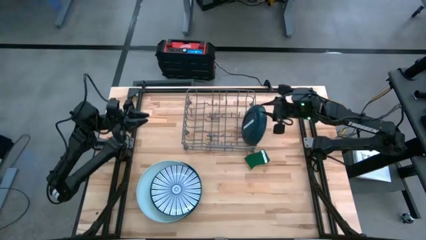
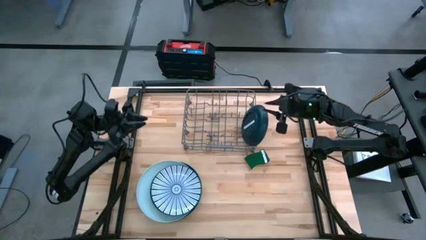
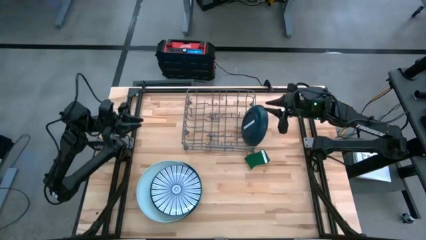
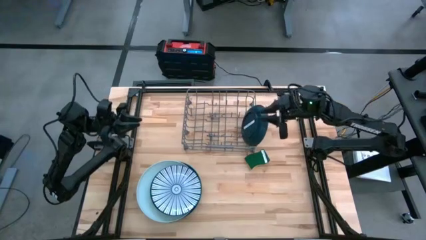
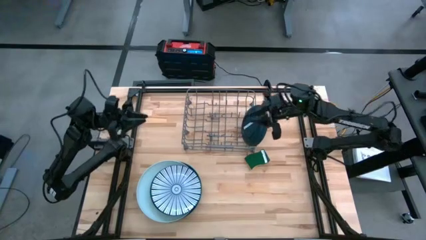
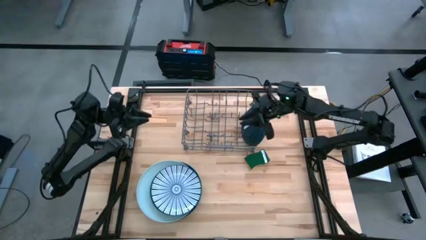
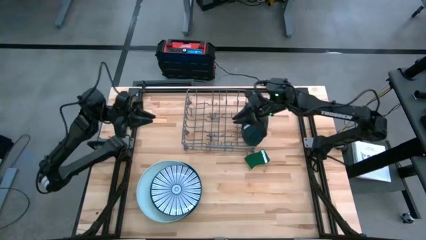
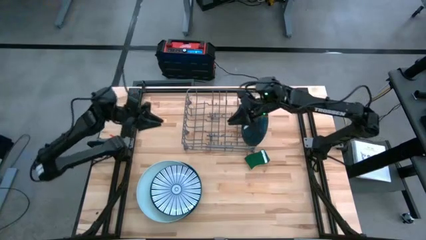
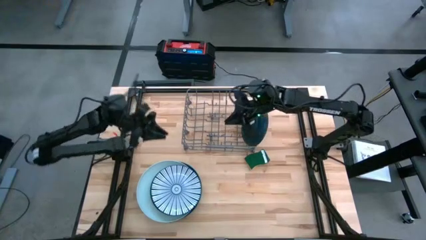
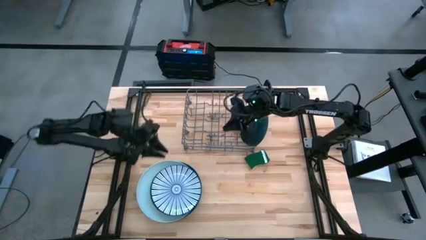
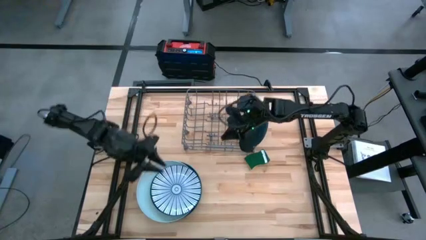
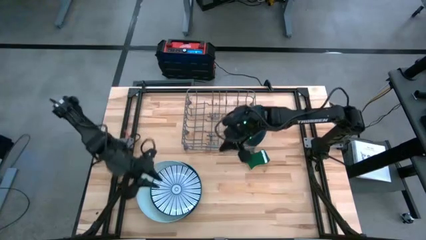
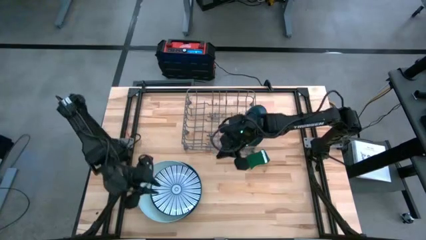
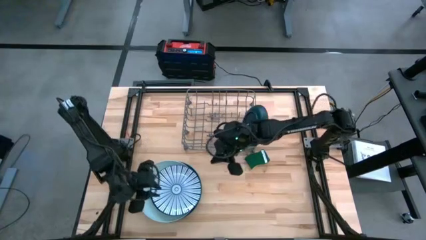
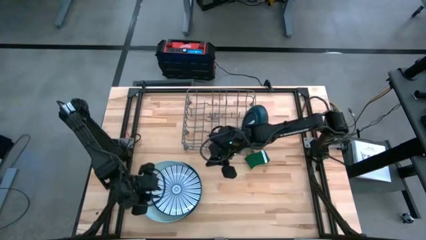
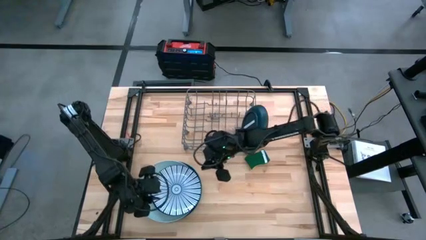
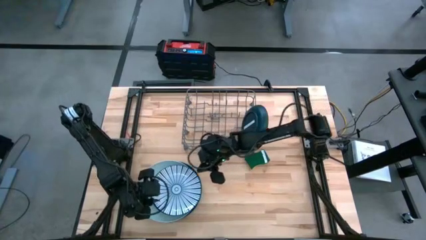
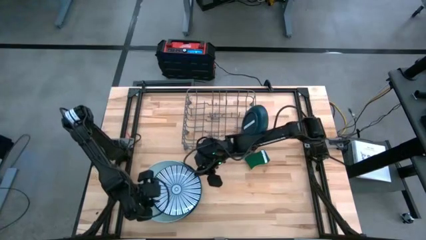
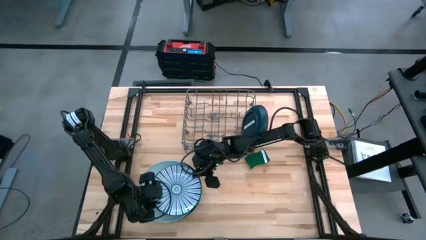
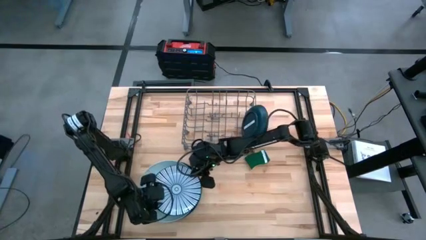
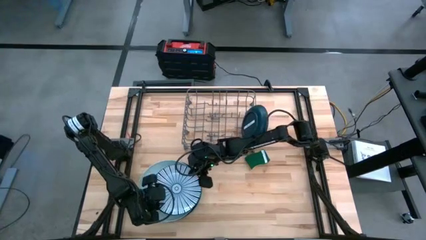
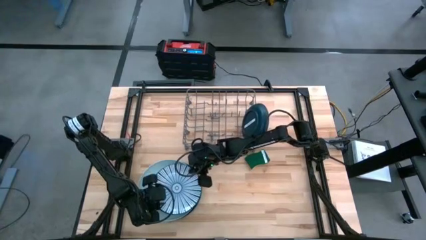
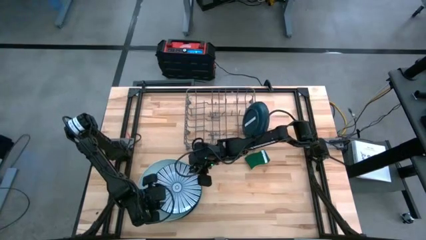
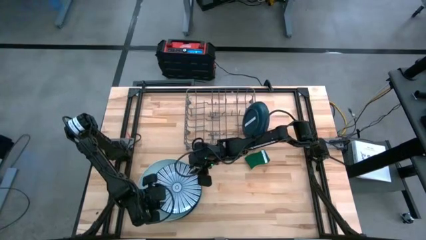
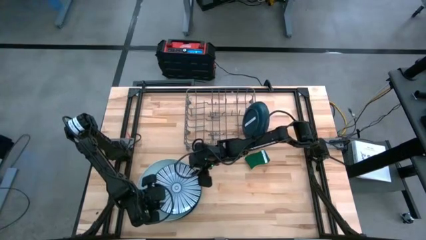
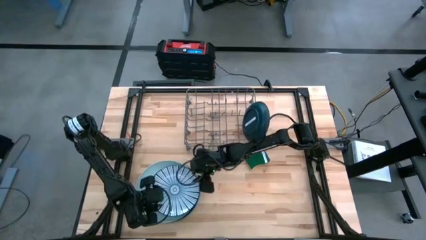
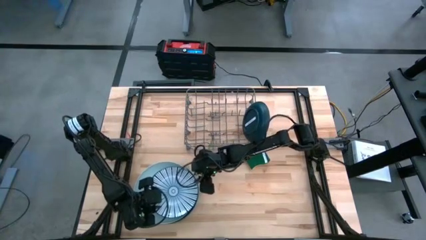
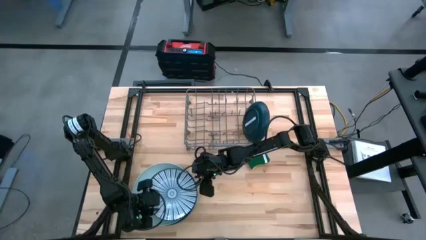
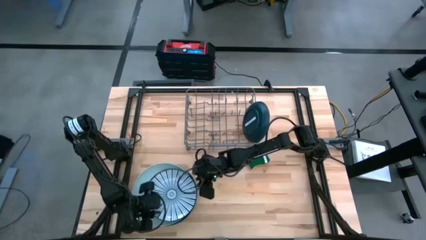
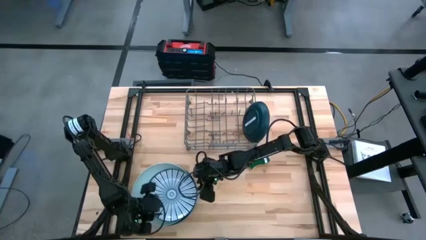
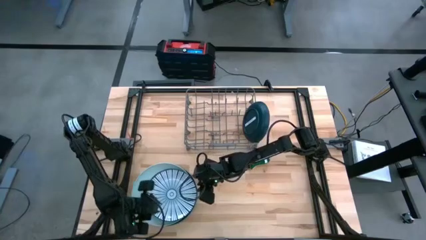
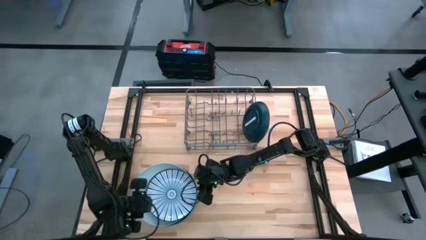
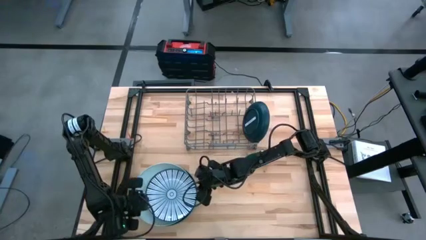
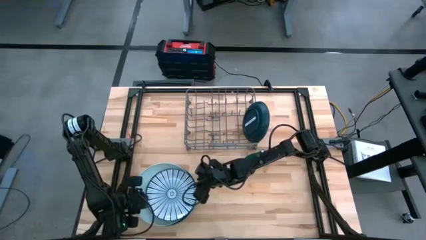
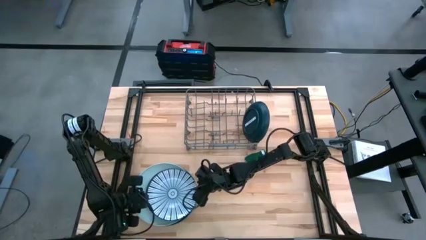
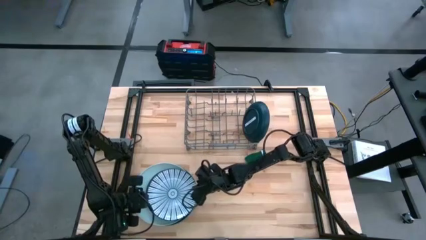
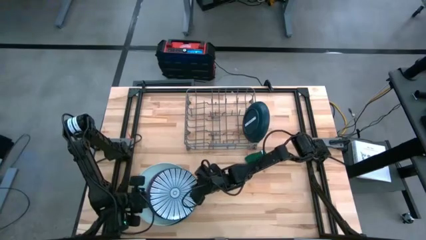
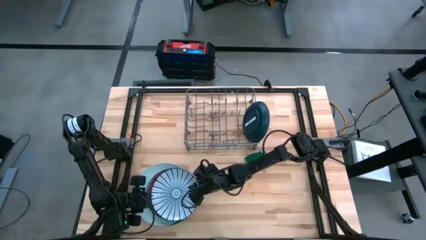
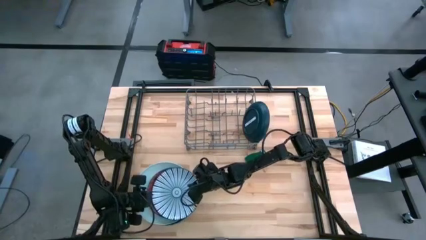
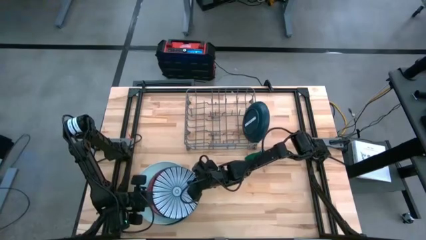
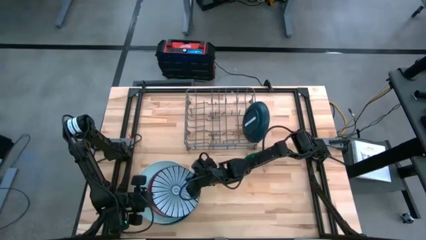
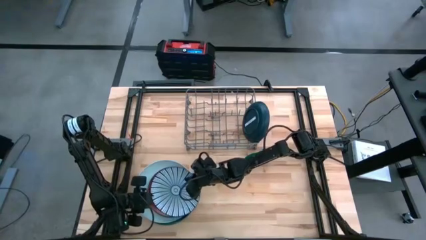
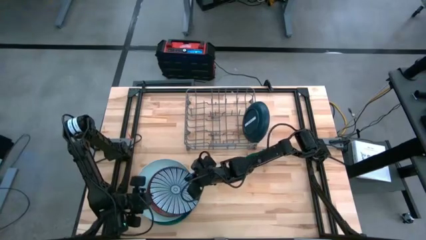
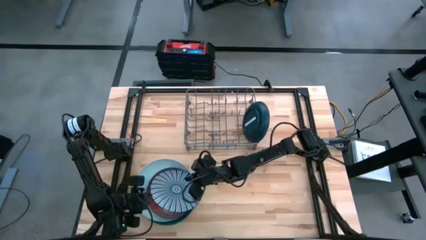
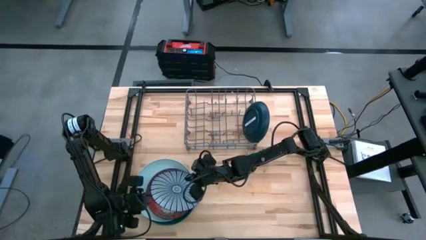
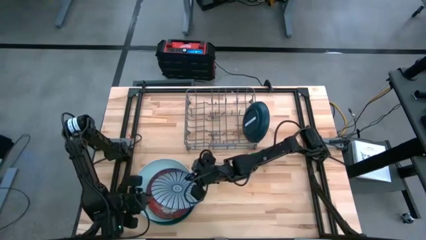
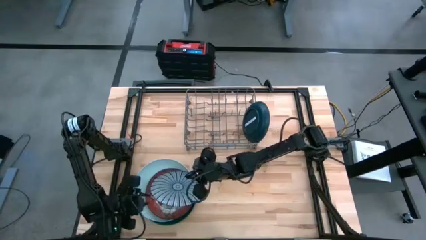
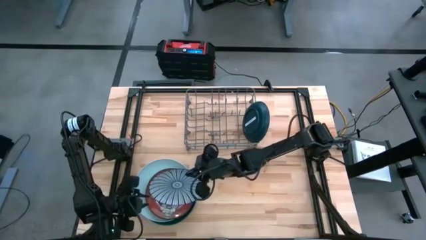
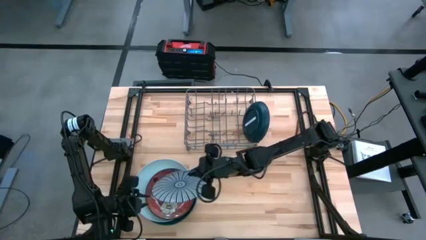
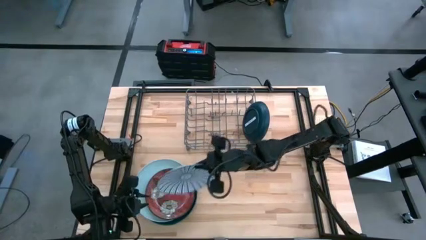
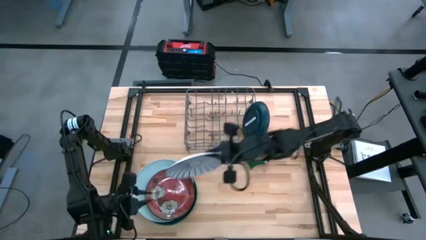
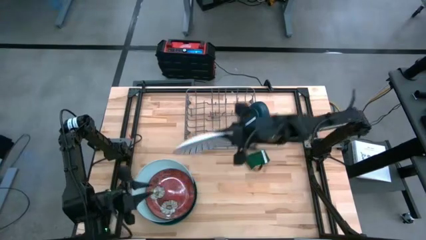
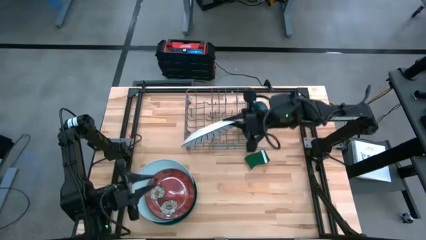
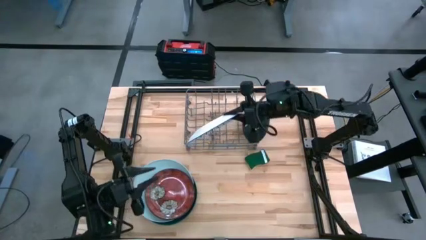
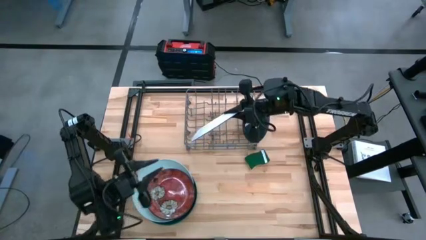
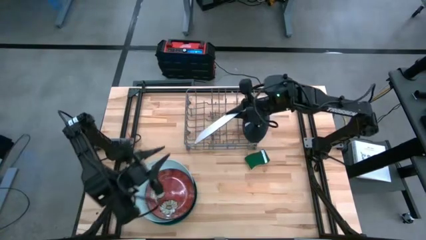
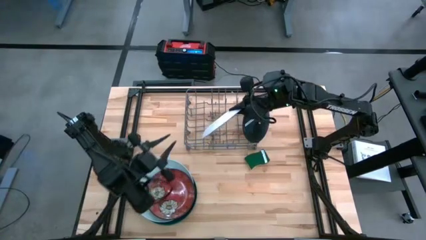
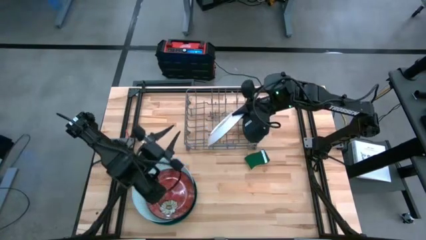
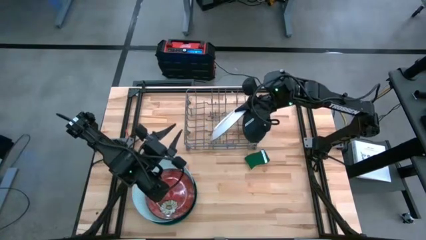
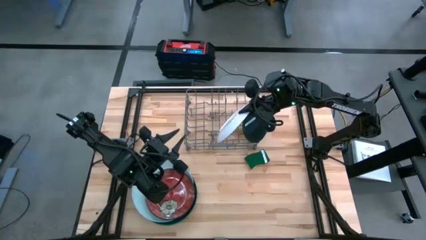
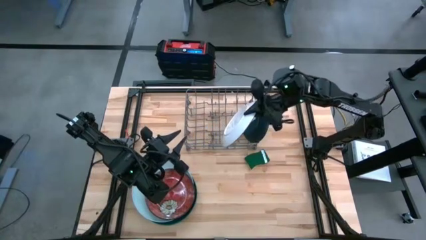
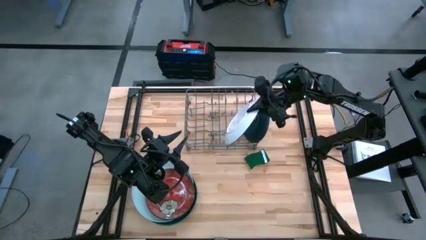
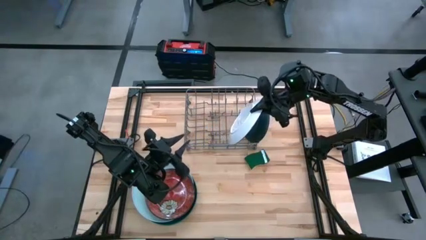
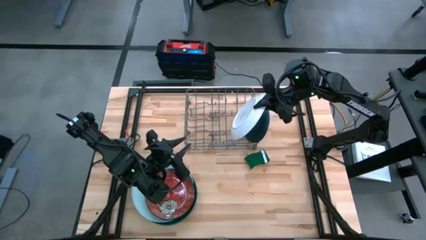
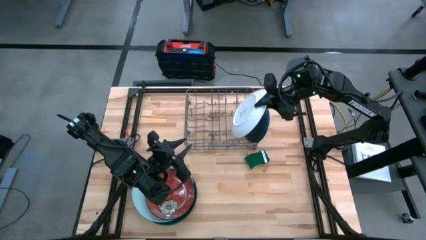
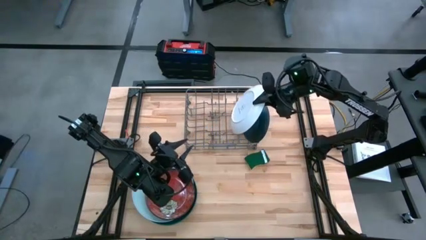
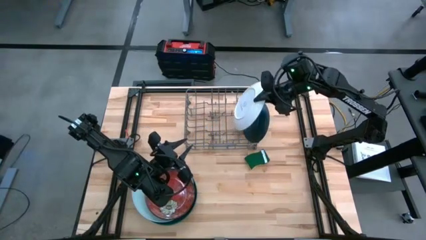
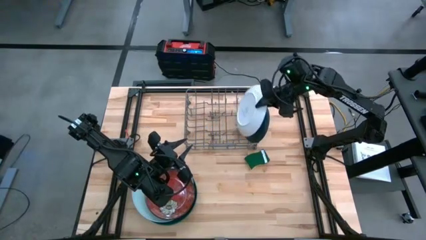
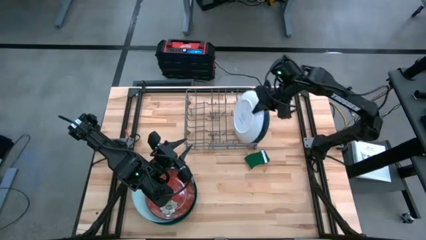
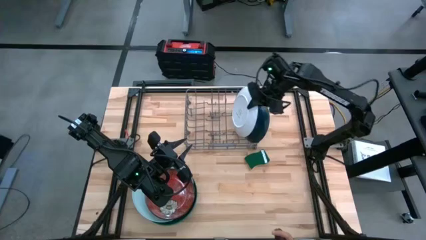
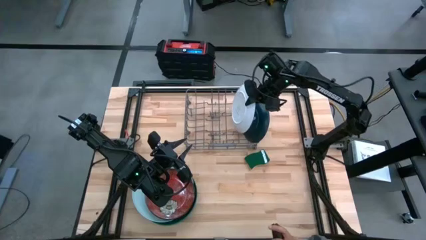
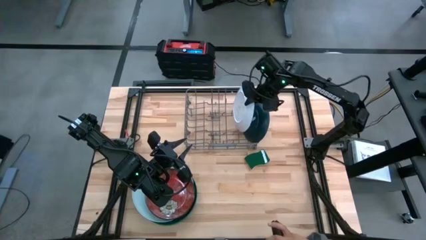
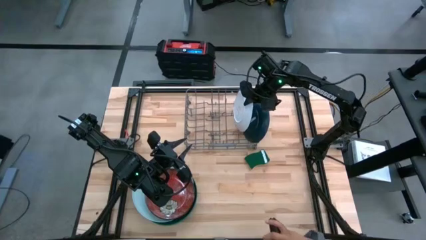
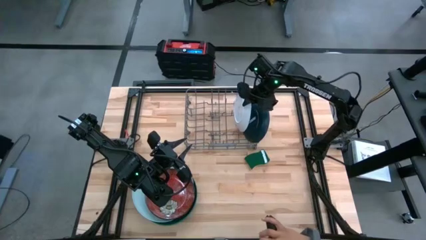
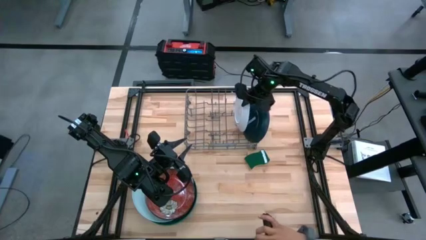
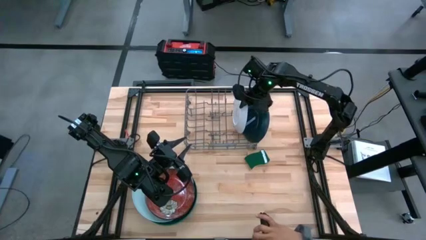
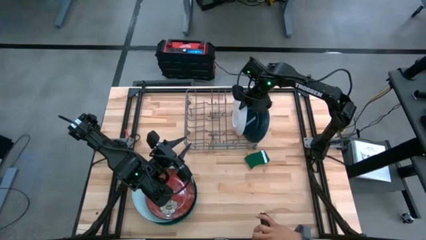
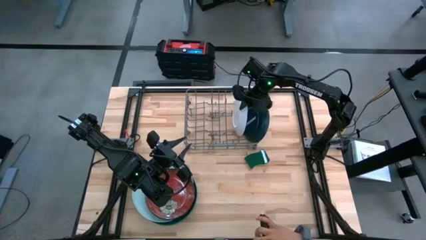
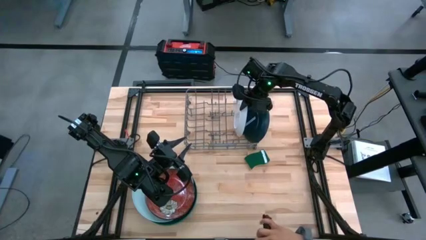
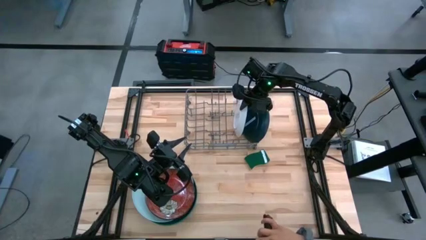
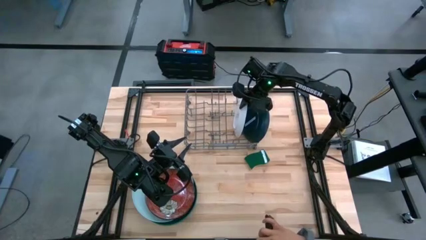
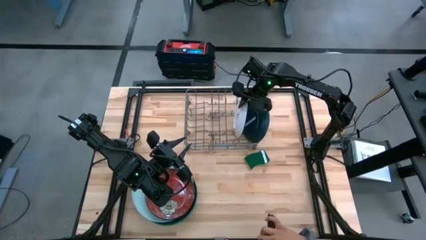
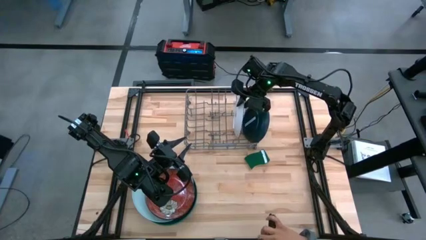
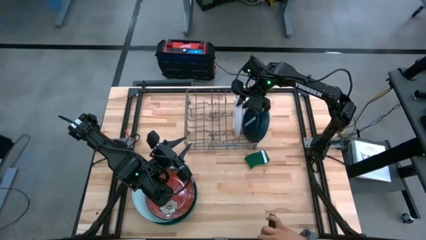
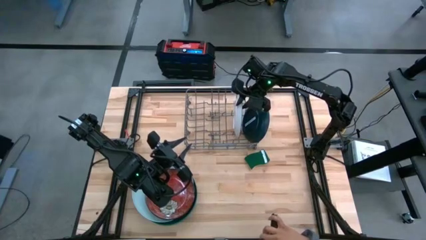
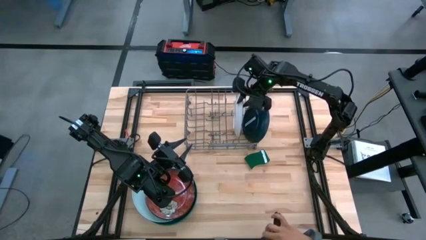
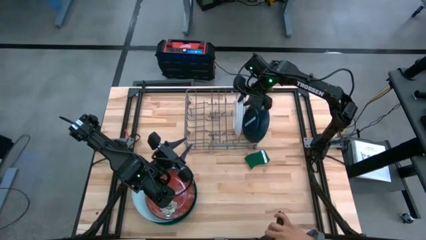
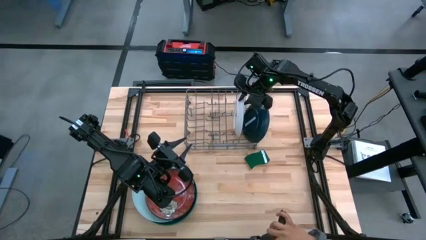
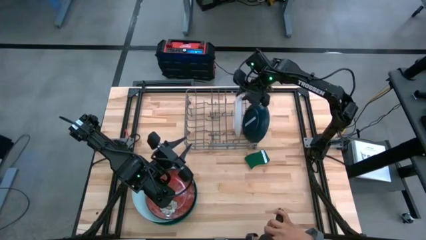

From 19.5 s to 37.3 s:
Task: Sort dishes
Put the blue plate into the dish rack
